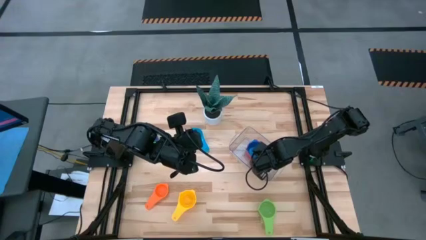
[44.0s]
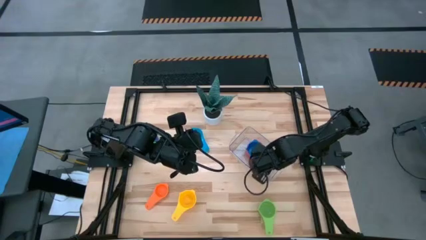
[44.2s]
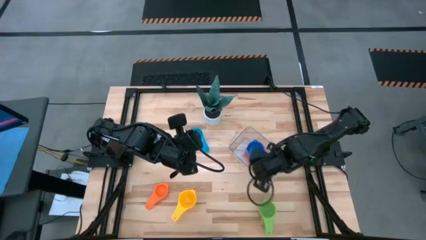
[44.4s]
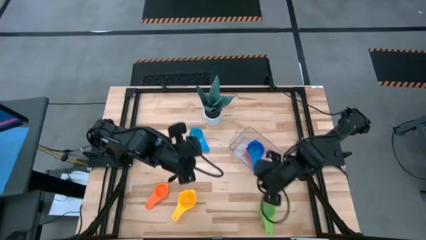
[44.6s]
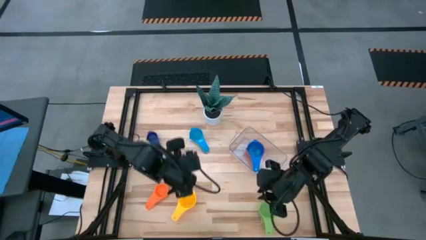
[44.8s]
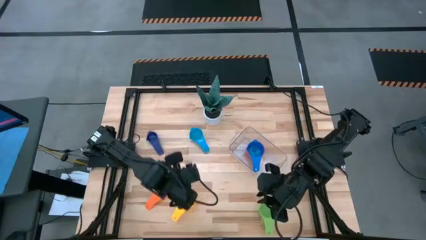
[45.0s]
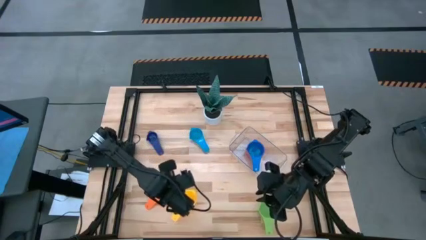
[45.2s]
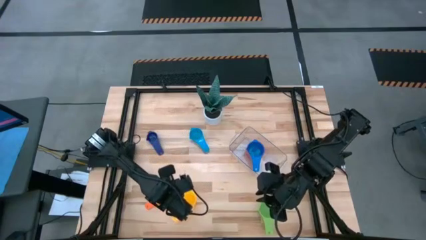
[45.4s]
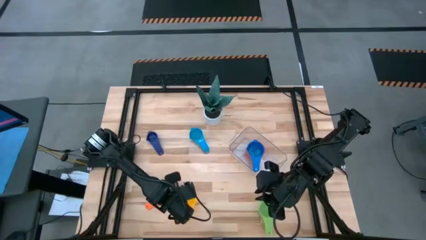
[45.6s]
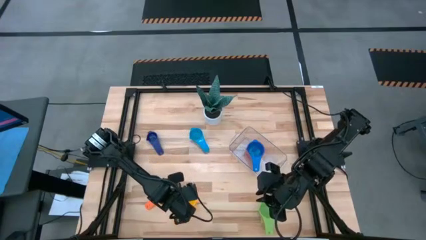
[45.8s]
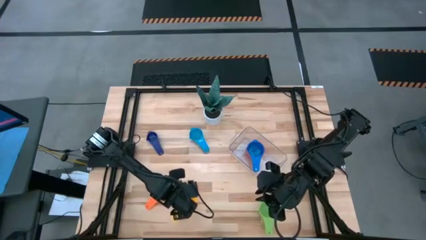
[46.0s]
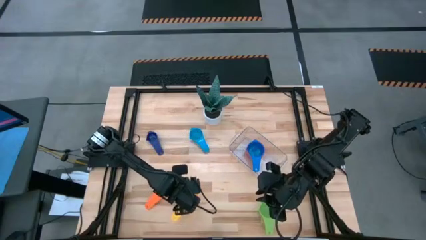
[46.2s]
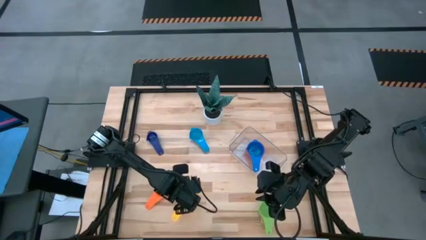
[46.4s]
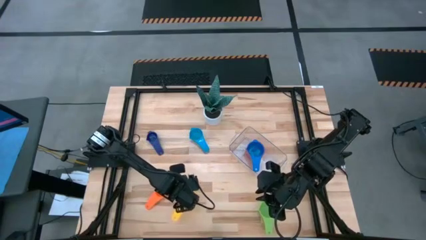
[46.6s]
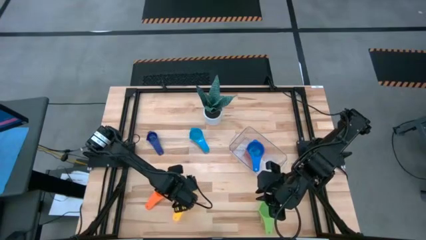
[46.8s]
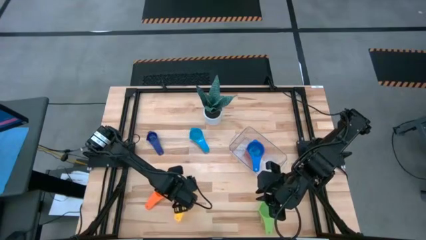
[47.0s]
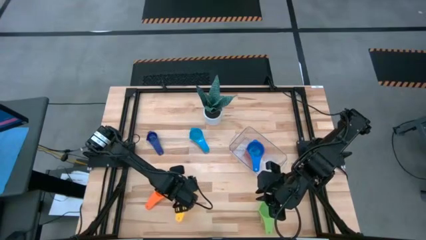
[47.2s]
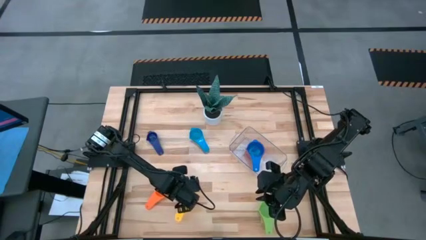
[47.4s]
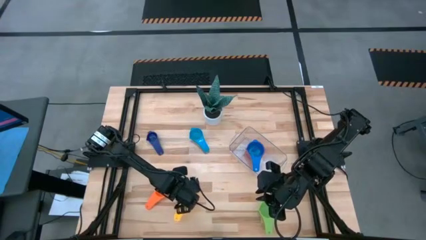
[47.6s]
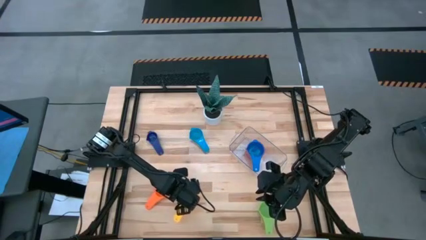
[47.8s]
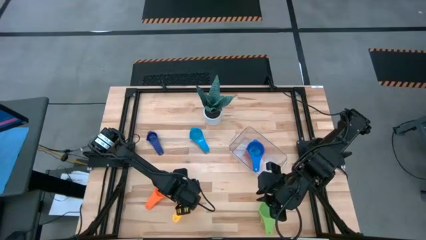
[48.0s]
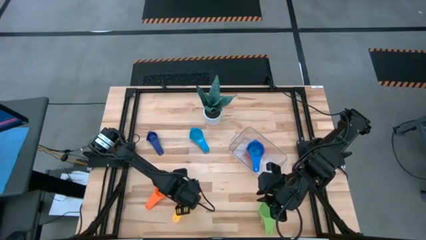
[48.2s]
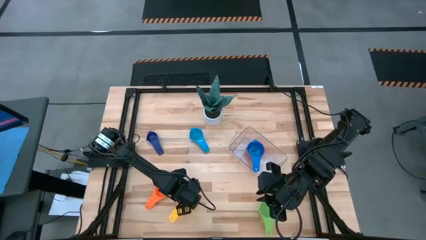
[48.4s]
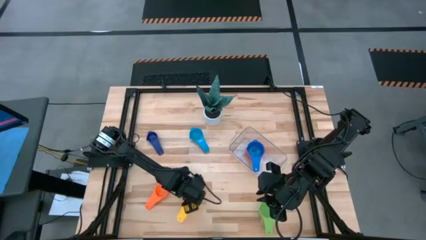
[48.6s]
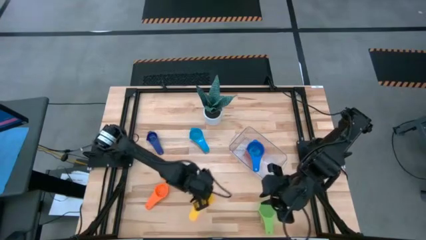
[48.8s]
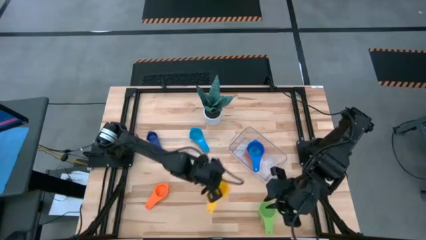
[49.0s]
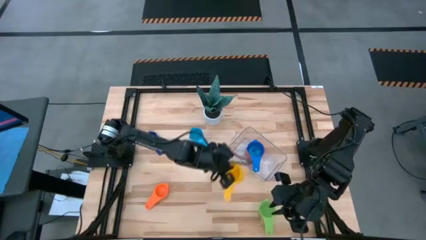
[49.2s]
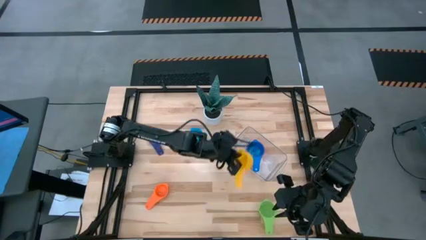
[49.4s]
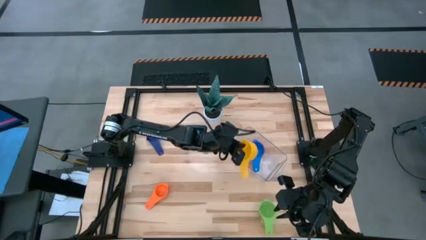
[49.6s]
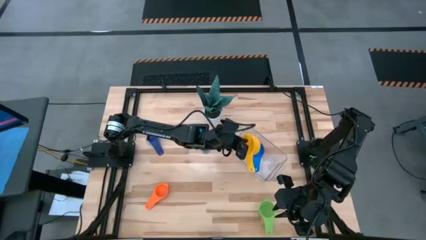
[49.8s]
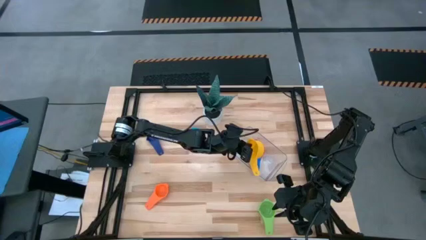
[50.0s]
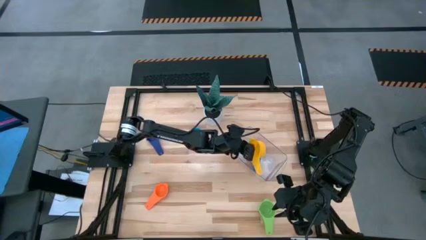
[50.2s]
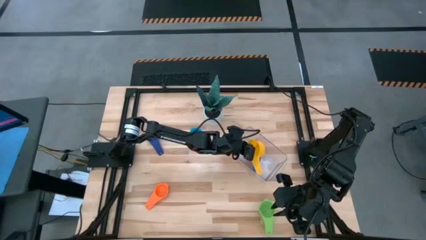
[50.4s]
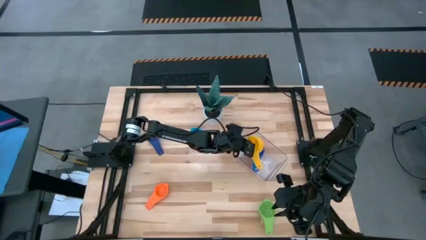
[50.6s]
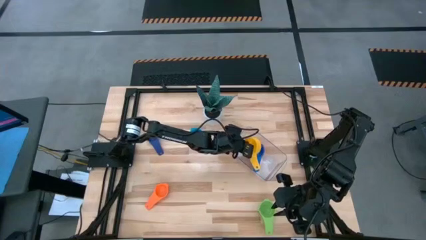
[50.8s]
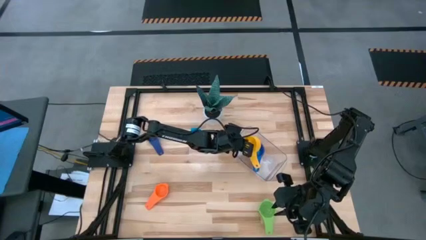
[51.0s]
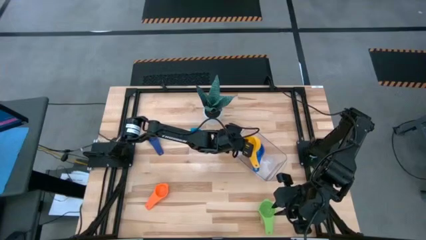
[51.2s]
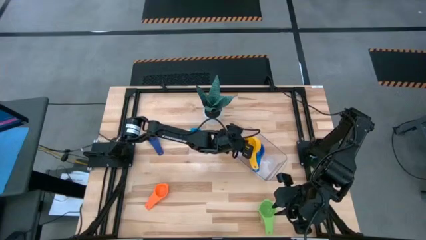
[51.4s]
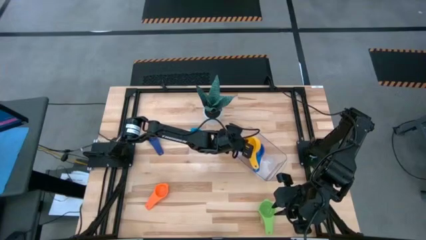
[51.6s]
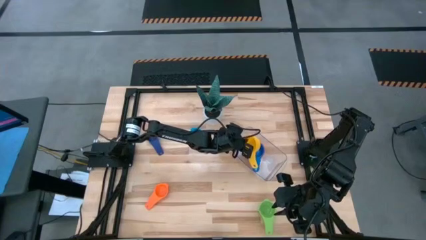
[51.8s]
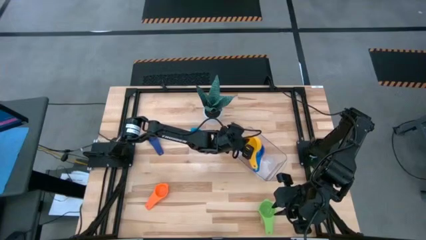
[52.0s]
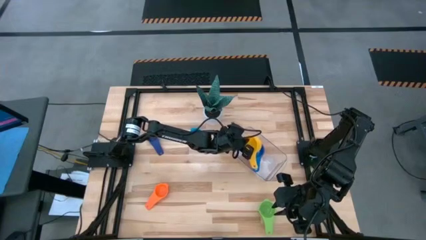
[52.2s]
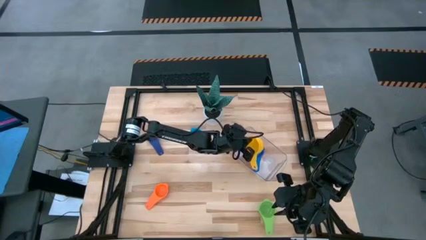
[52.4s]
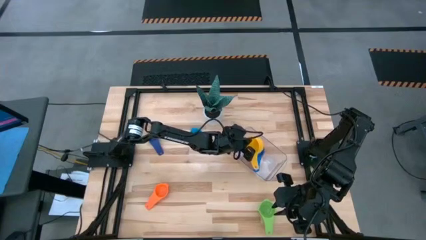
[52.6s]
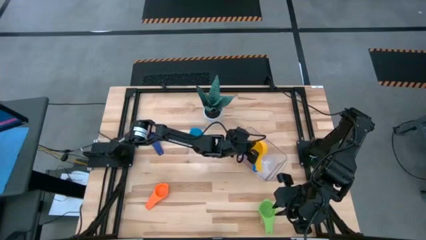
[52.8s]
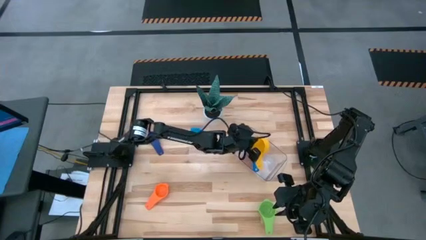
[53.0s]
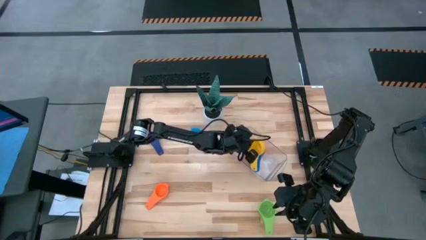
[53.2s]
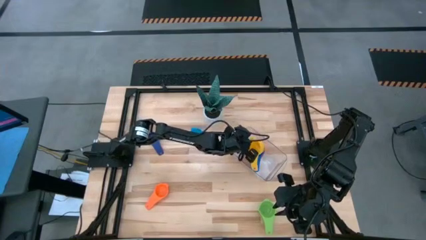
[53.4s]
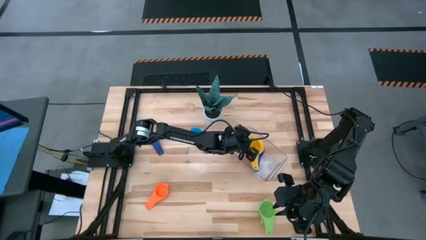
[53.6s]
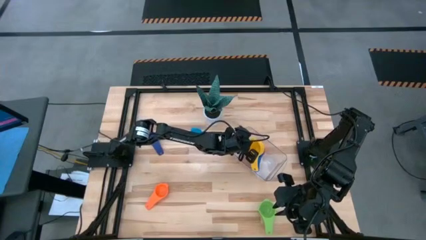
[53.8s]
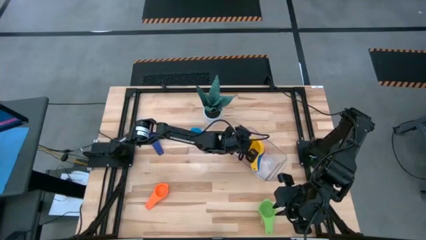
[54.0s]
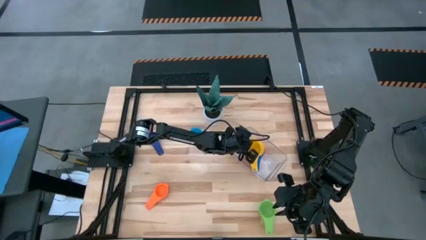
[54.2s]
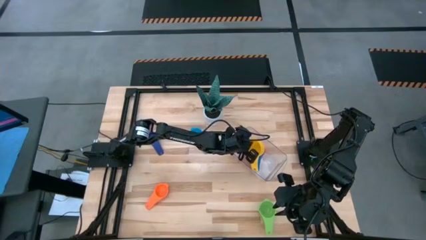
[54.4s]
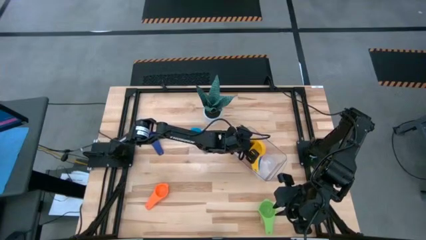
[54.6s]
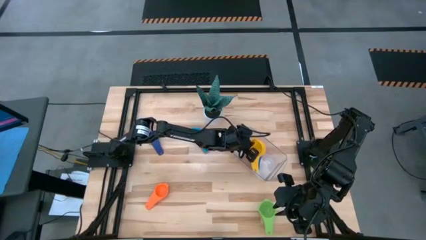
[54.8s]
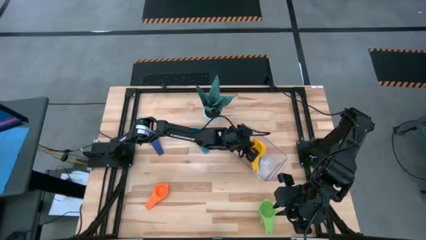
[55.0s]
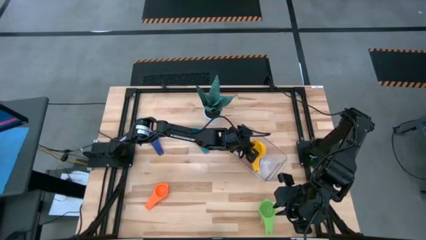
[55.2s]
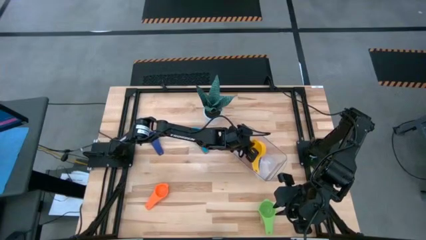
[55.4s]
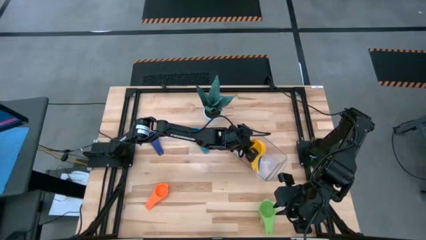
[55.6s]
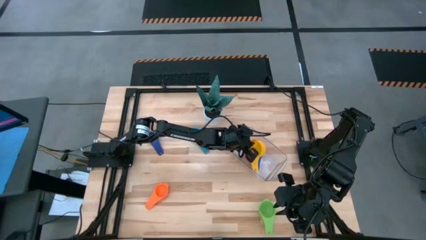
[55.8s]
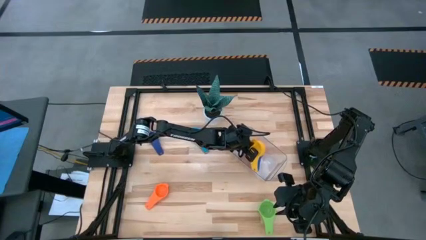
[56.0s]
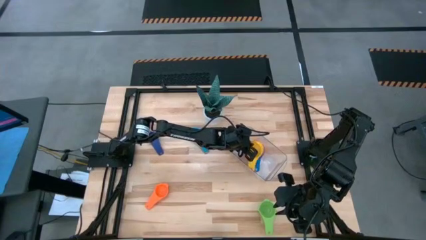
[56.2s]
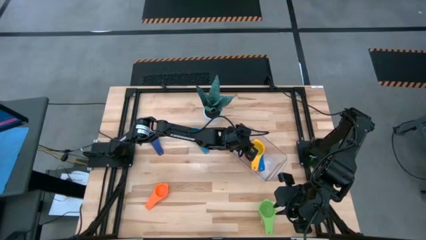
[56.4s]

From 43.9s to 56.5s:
Task: Nest measuring cups in basket
Stack the yellow measuring cup on top of the blue measuring cup
